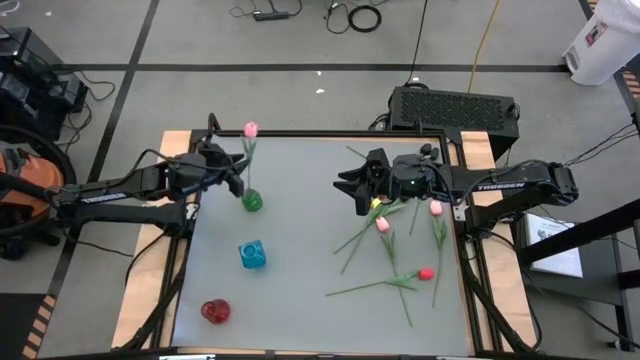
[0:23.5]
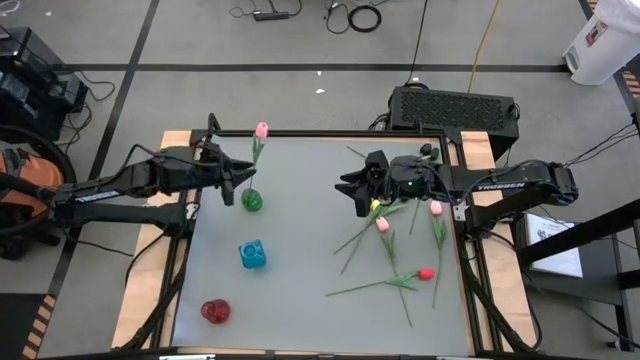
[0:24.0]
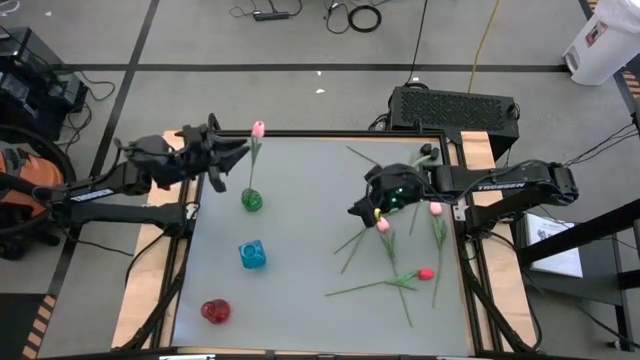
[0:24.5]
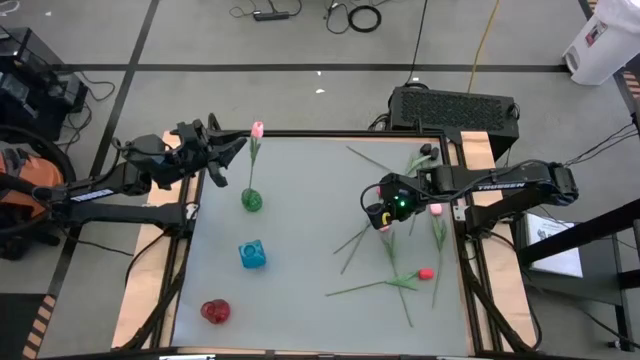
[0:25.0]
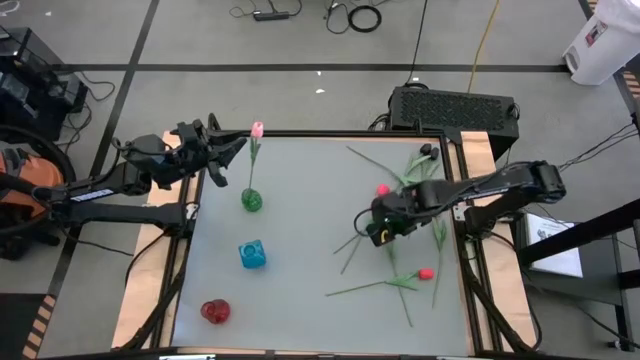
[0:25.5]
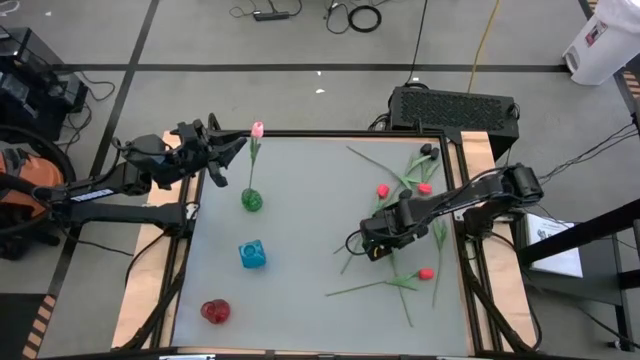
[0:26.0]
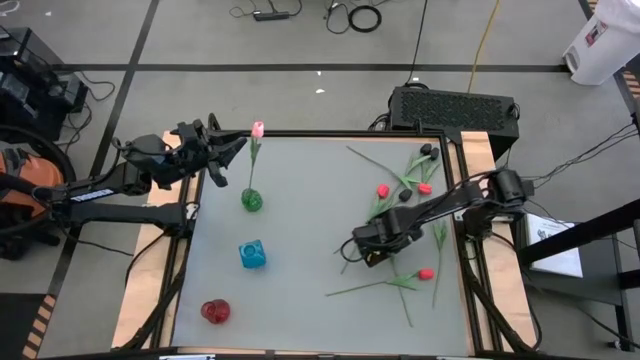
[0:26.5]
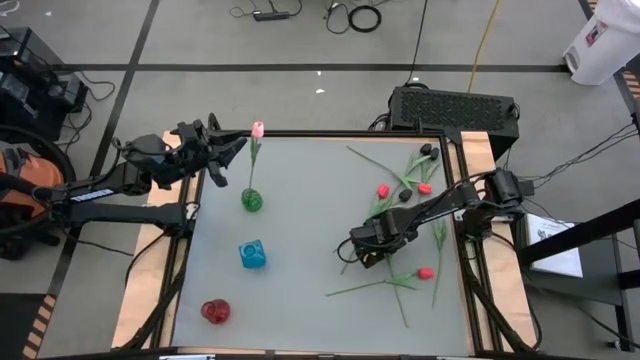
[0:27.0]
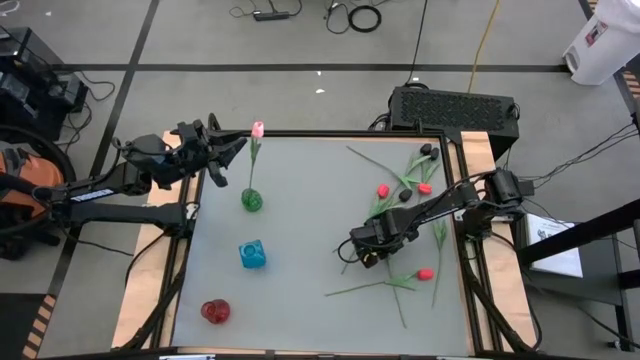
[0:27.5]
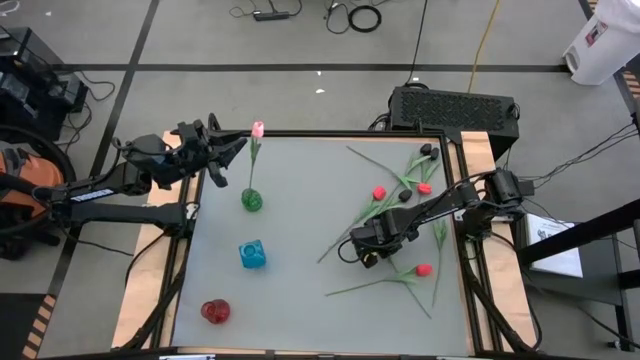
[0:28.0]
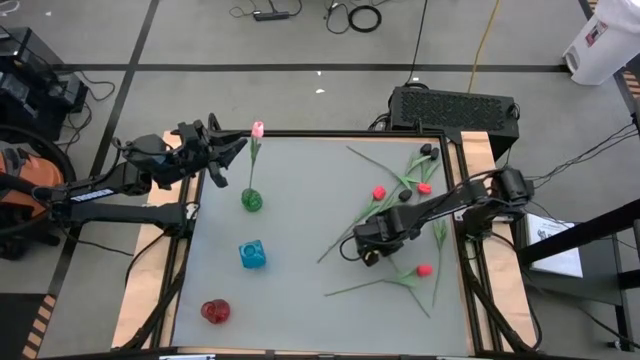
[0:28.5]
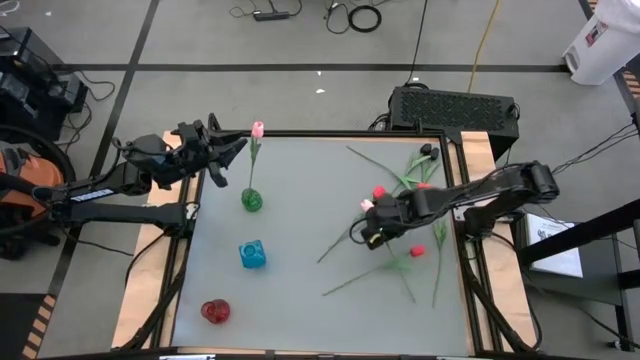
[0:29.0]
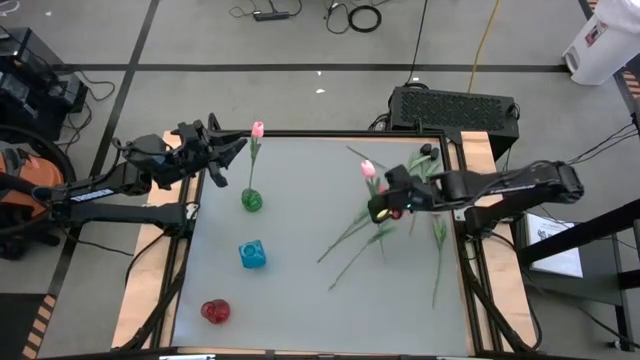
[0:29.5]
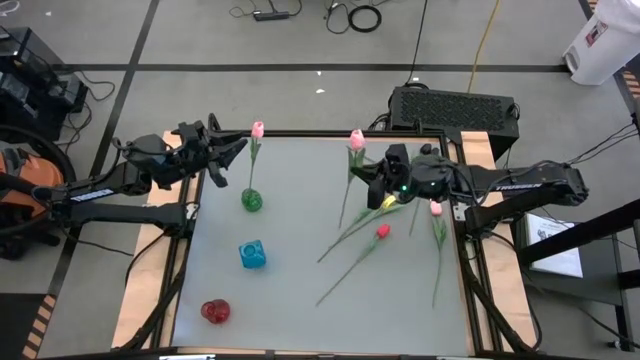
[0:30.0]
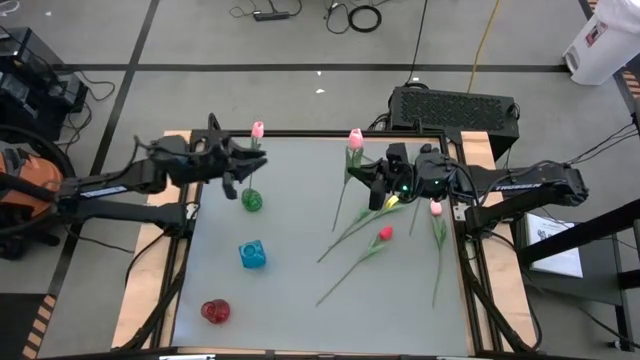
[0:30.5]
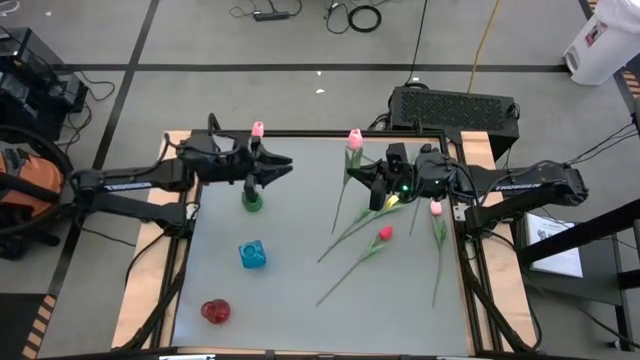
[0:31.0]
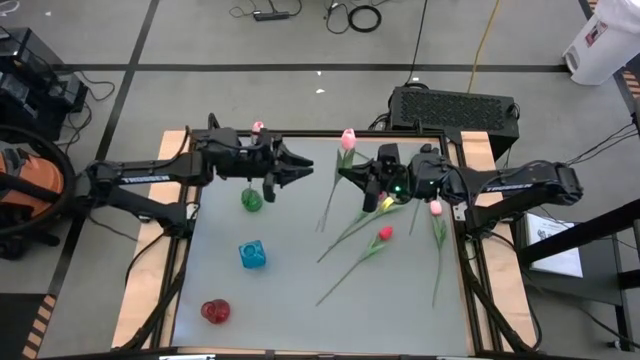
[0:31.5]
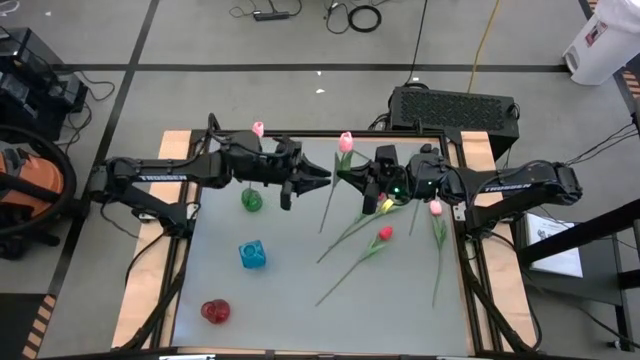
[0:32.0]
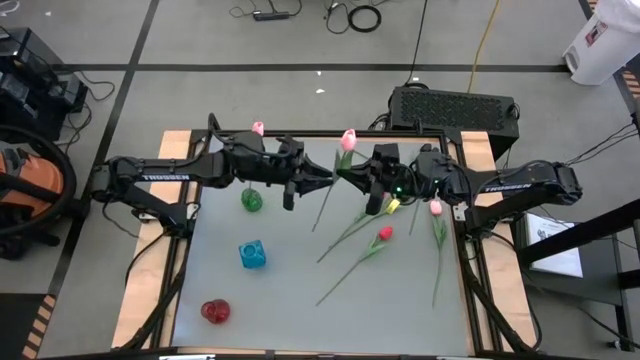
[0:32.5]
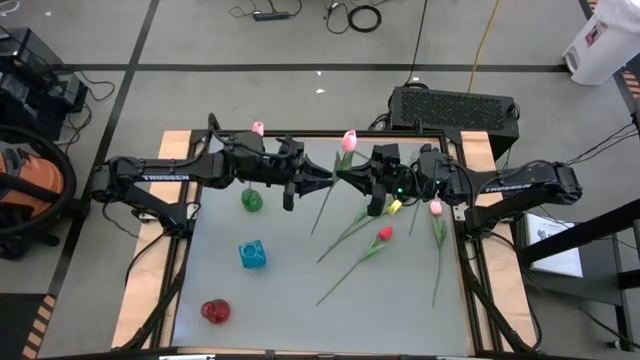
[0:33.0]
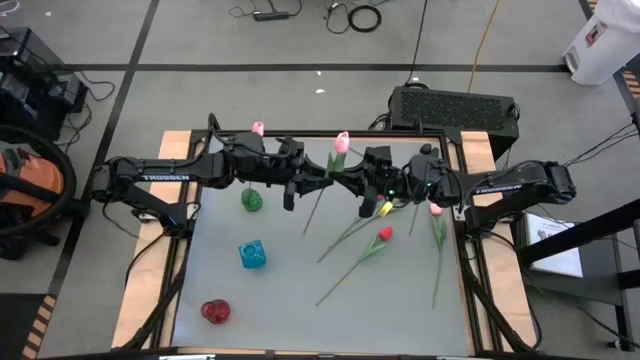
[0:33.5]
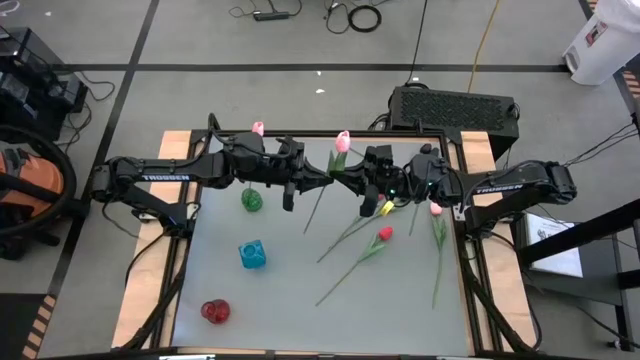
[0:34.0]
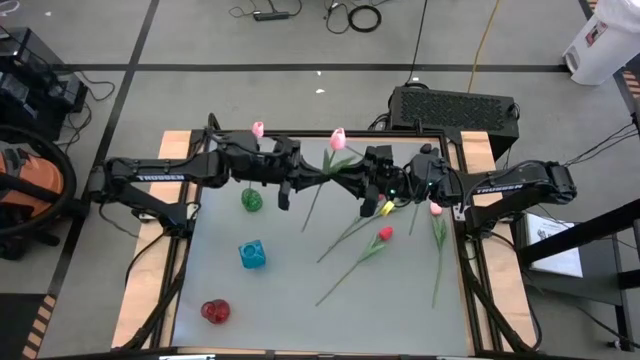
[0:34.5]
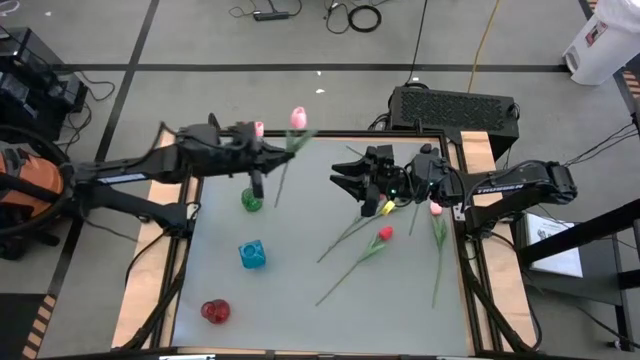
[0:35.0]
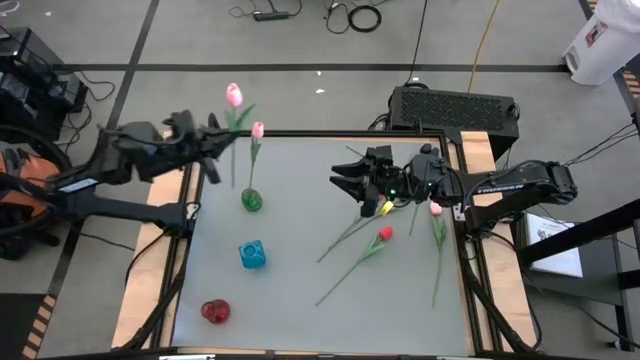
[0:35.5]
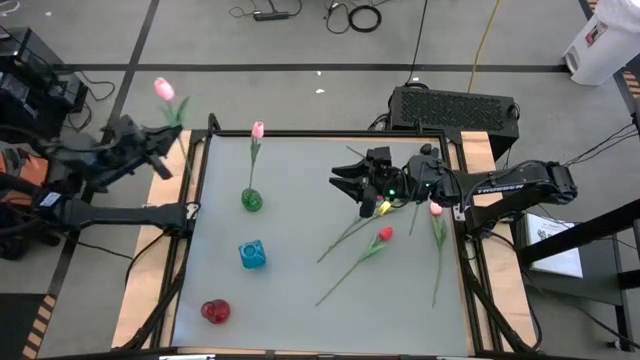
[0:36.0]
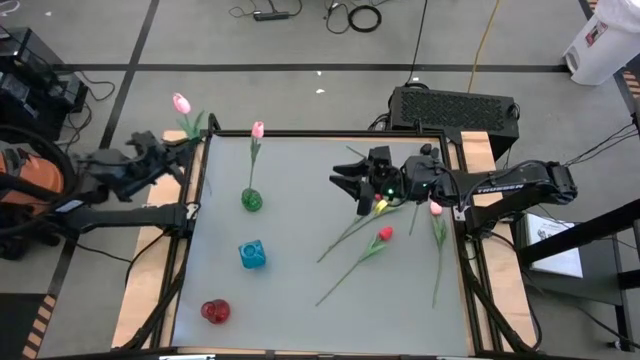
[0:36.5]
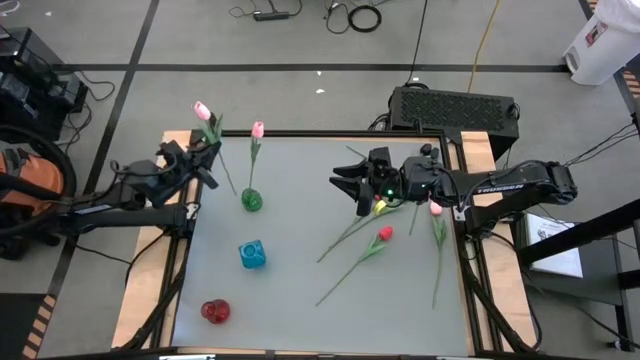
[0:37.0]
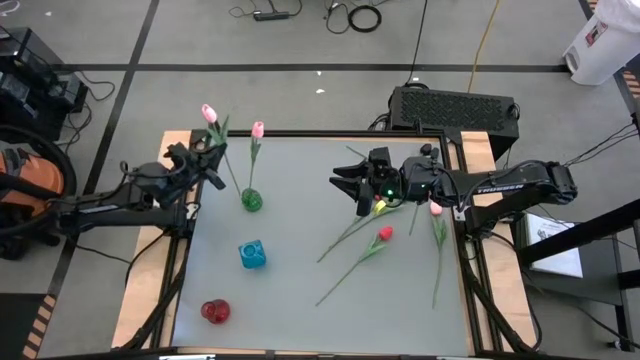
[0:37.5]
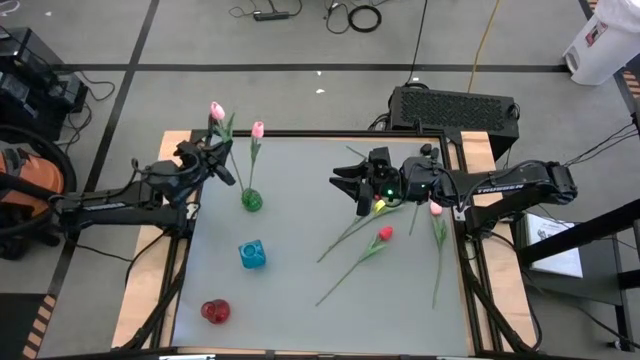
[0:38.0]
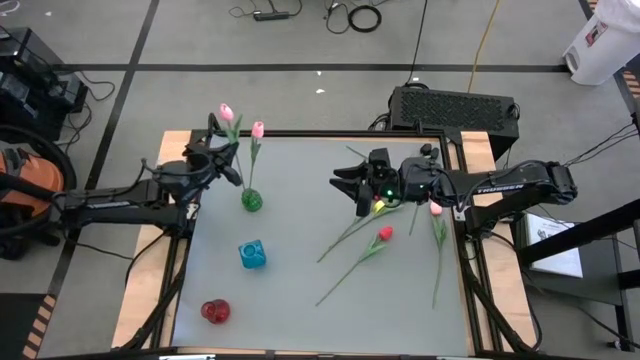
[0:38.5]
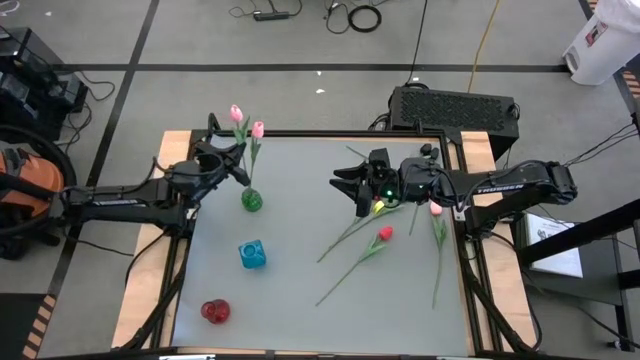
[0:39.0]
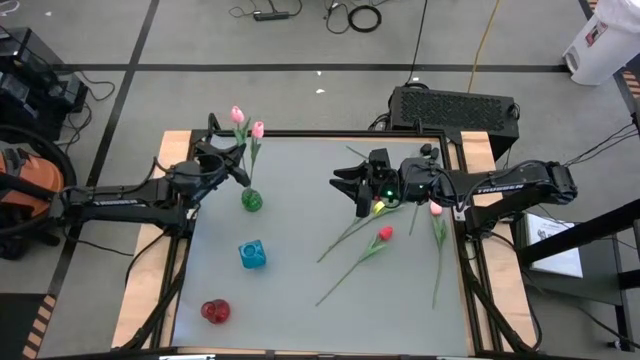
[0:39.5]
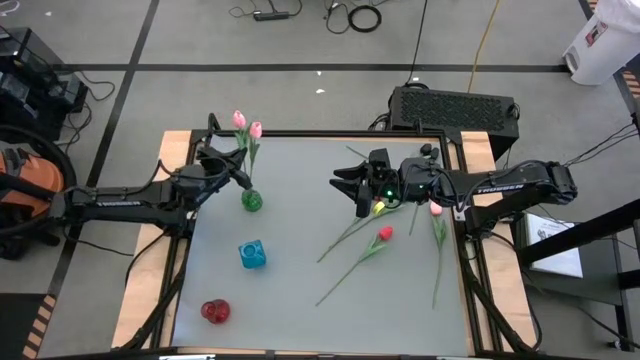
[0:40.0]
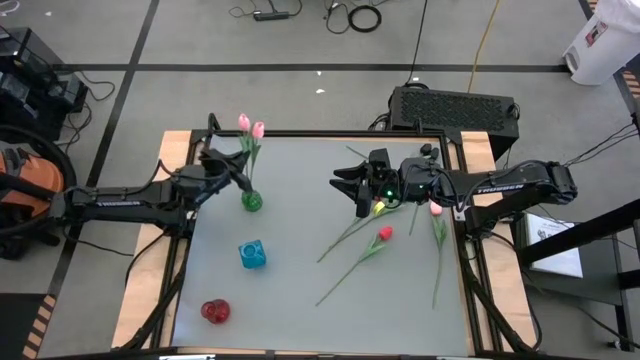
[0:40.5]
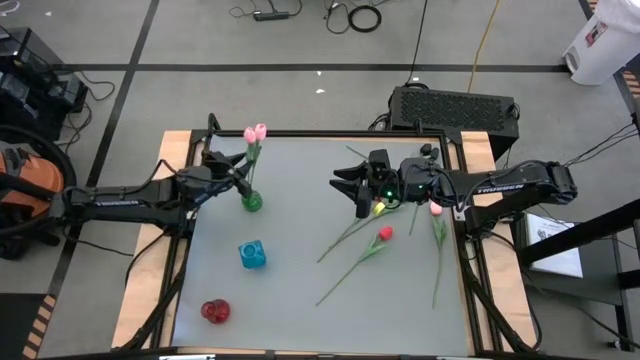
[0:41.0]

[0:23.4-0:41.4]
Task: Sort flowers into vase by color
Put the left pink flower into the green vase
